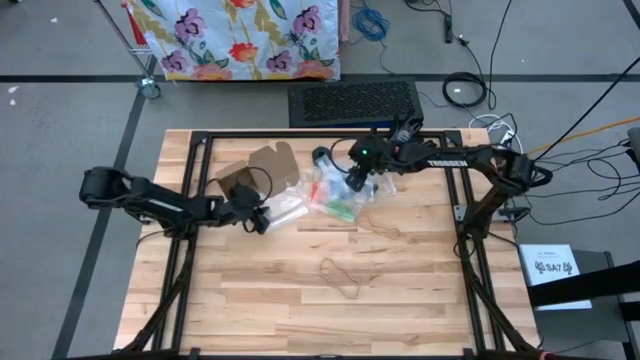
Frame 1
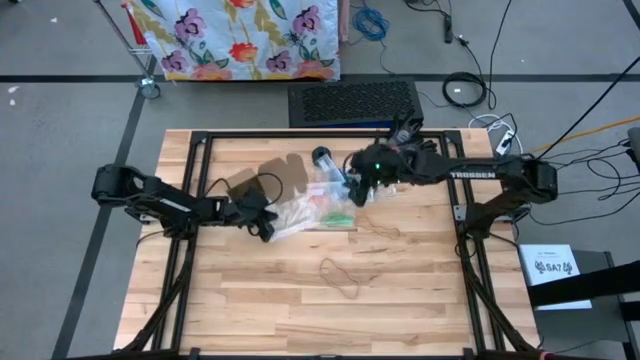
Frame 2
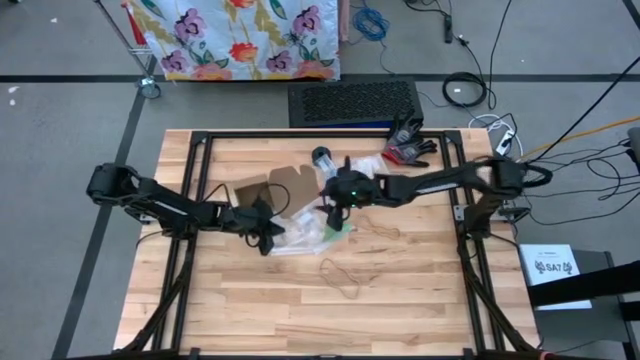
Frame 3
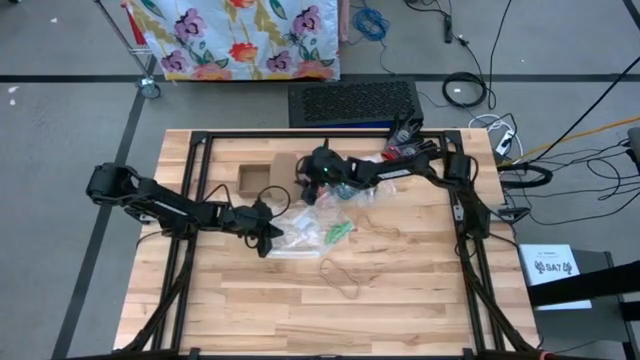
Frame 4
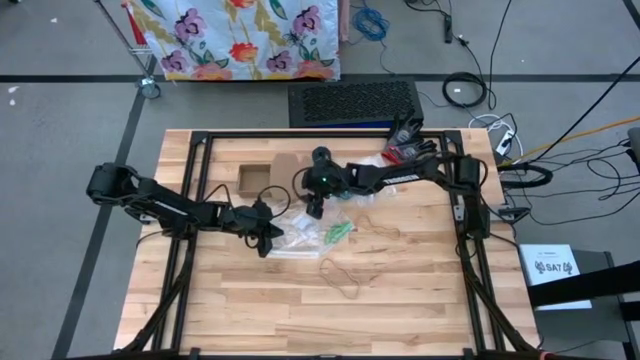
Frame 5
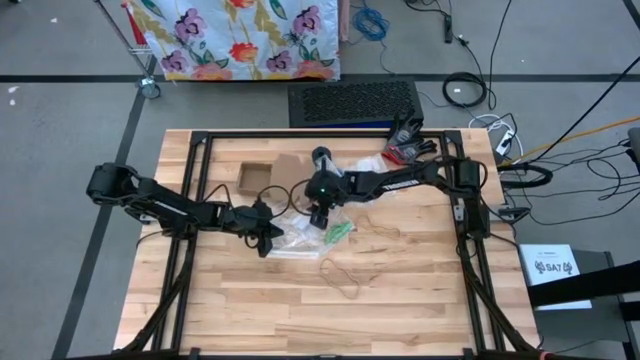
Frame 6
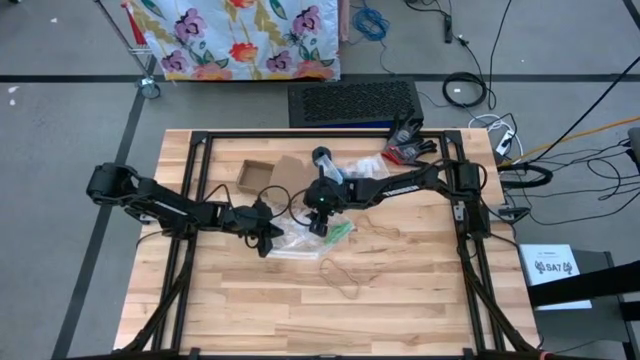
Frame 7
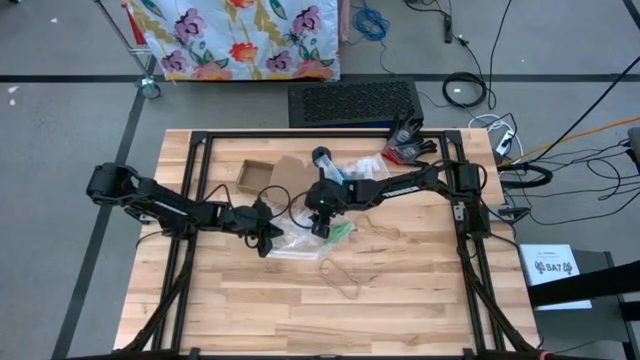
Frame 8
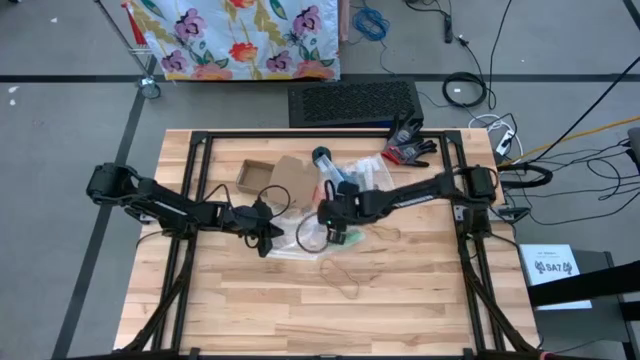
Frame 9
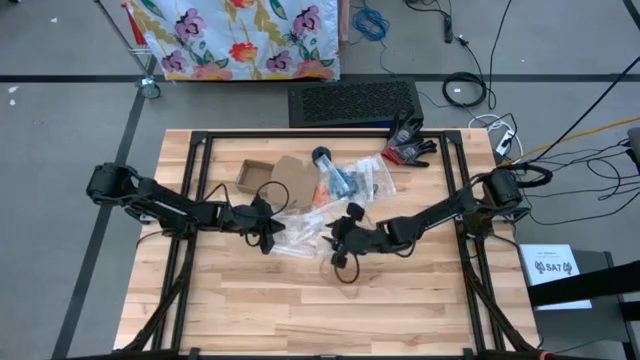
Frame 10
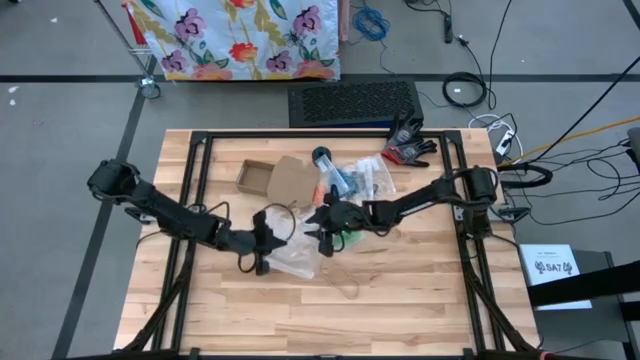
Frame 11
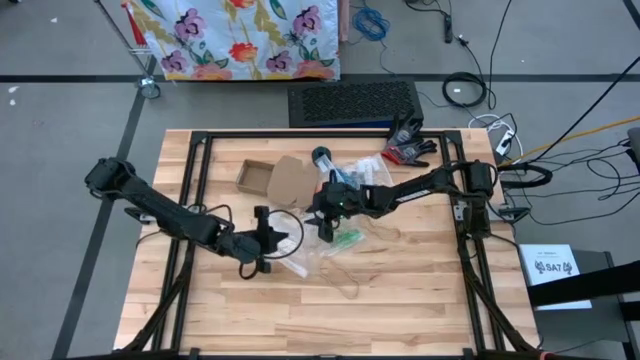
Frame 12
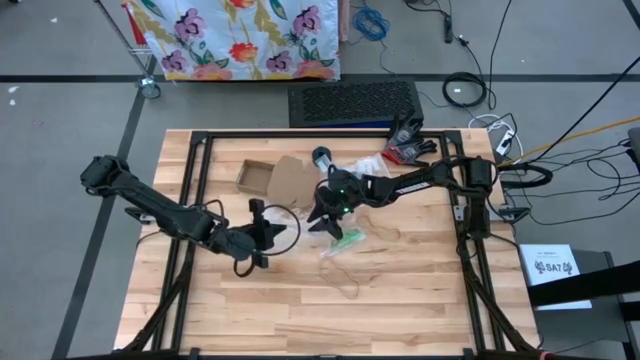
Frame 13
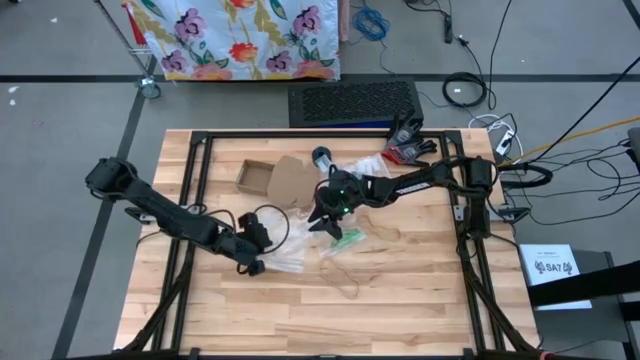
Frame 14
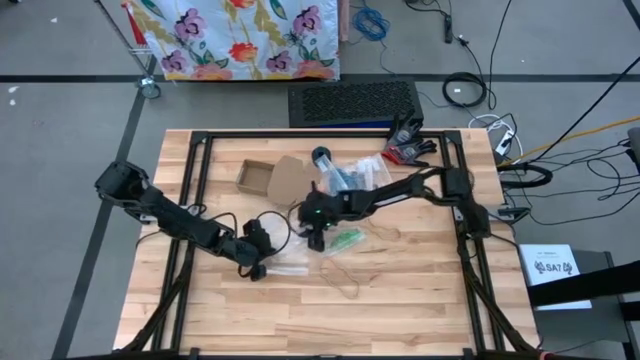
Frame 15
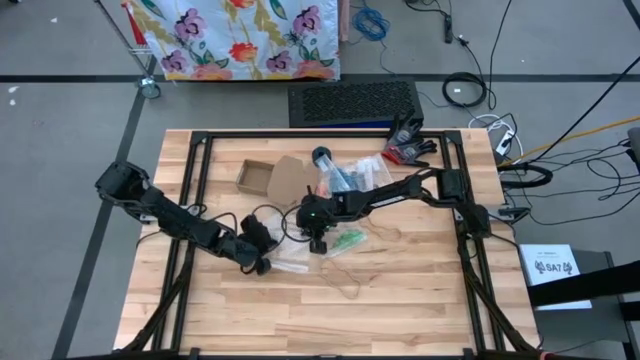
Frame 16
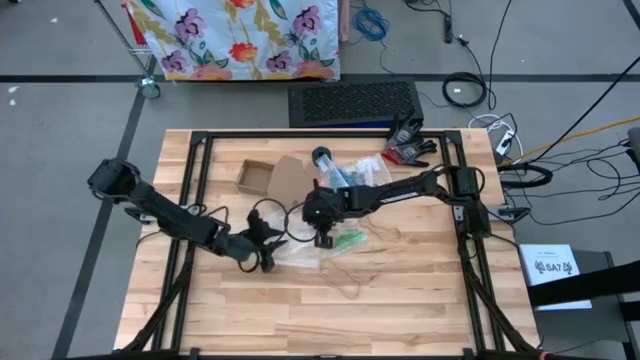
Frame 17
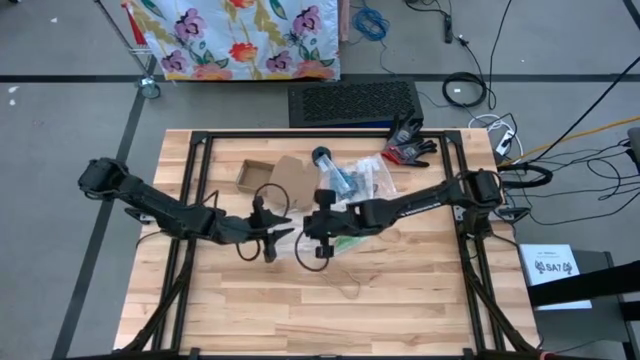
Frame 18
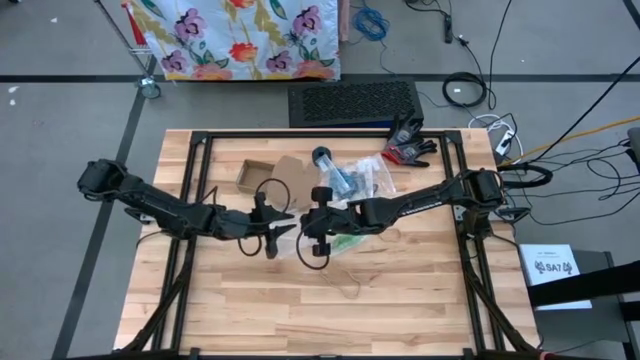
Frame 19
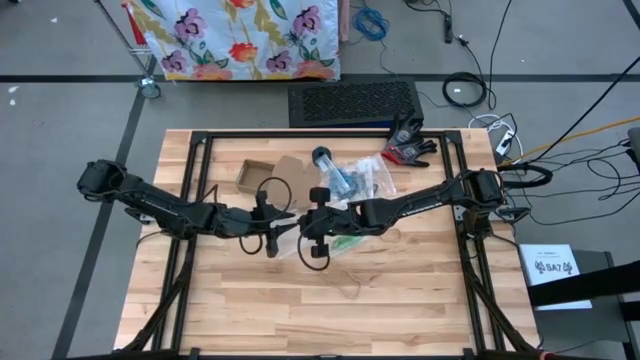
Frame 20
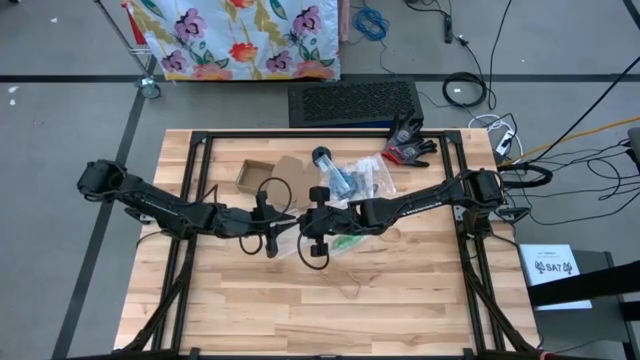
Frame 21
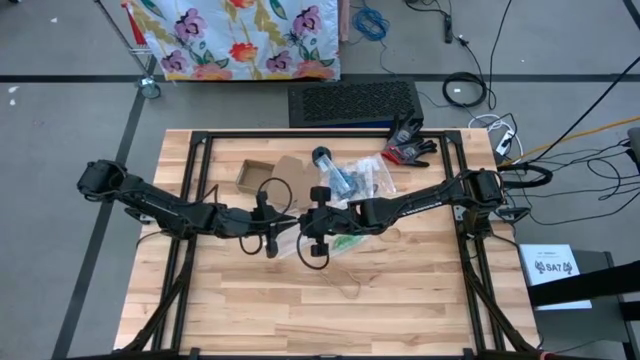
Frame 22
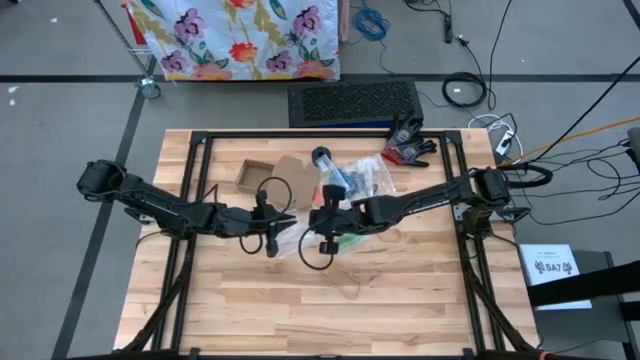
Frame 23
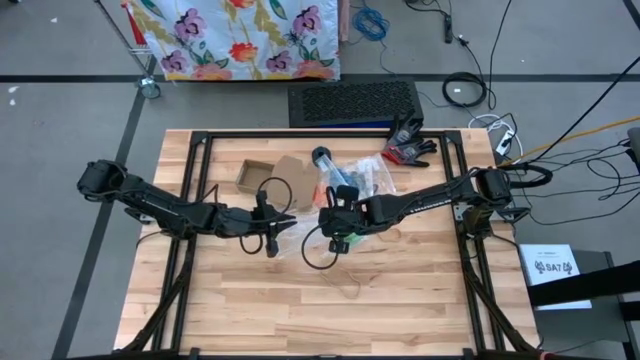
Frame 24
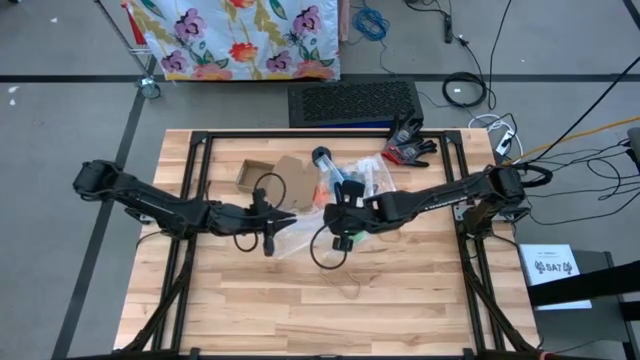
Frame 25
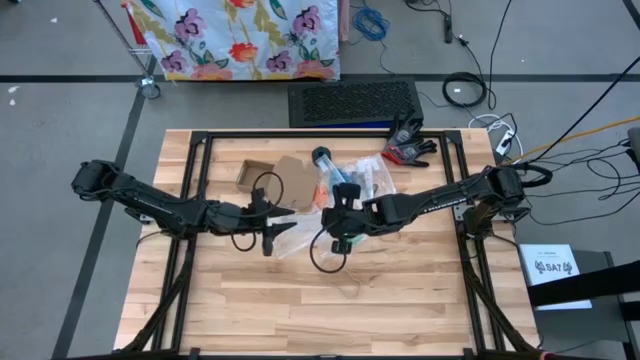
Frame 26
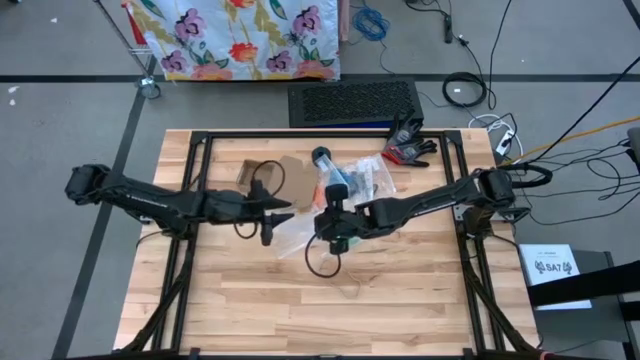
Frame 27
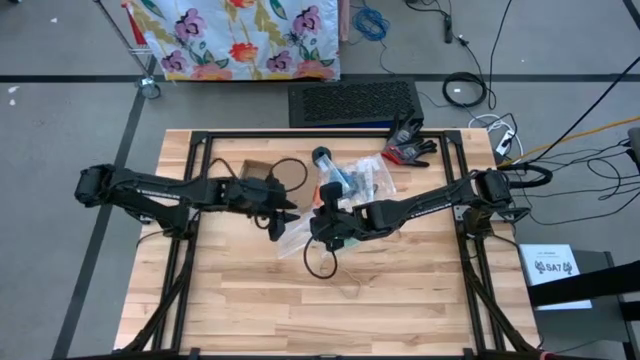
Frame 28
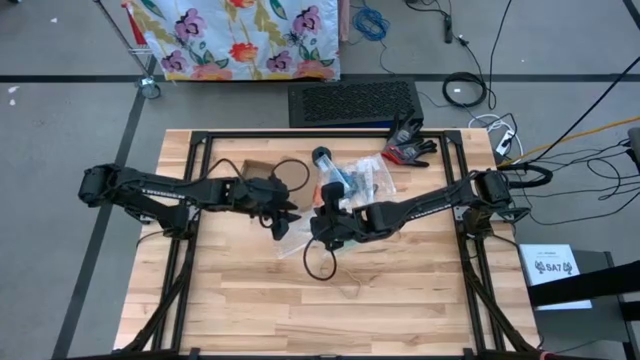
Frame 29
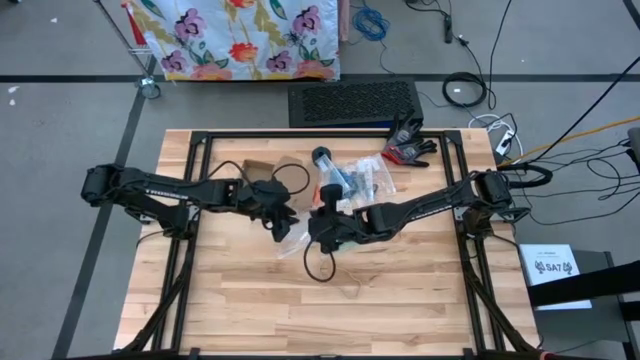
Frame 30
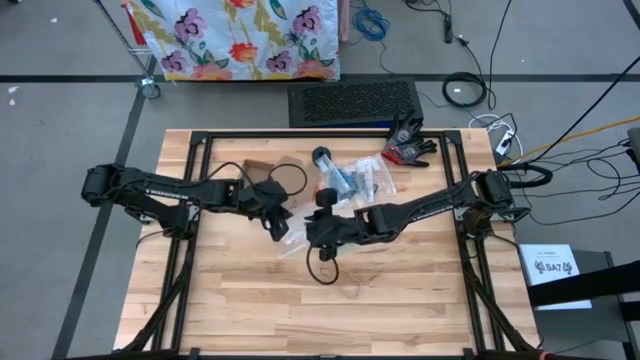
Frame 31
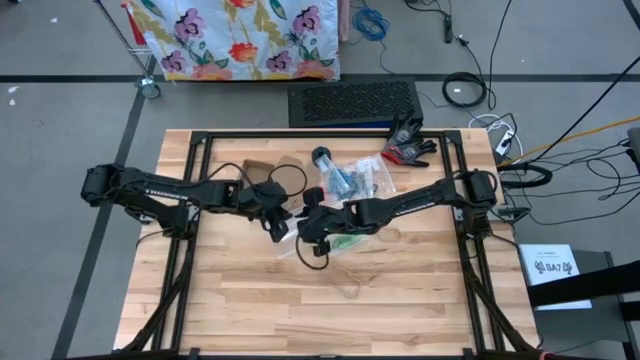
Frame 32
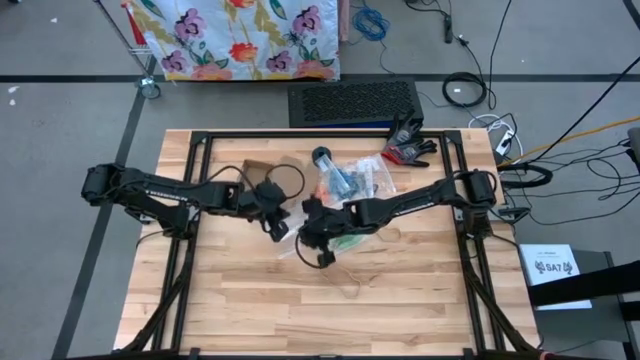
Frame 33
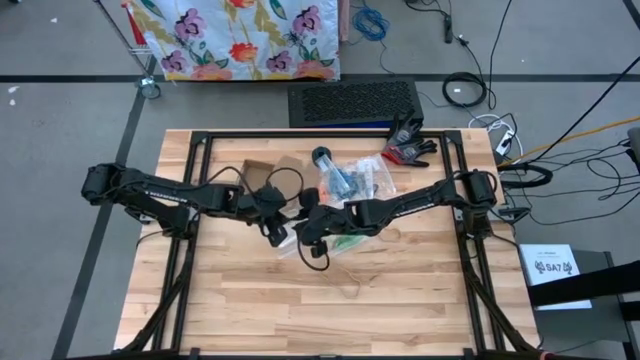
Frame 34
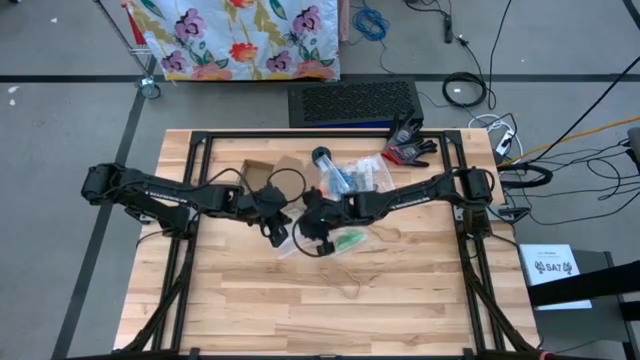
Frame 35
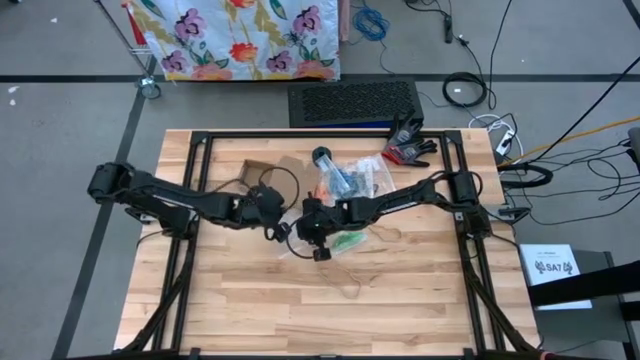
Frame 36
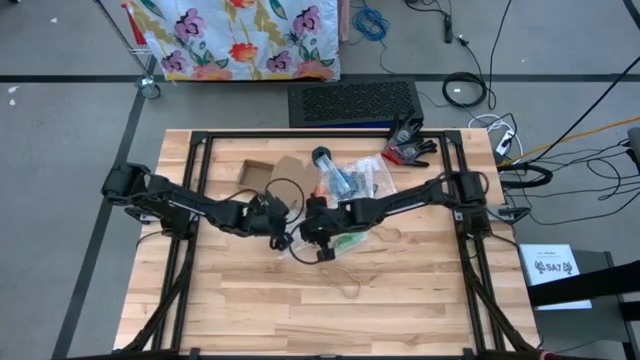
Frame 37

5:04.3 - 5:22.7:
Task: Sort rubber bands
Open the transparent zip bag

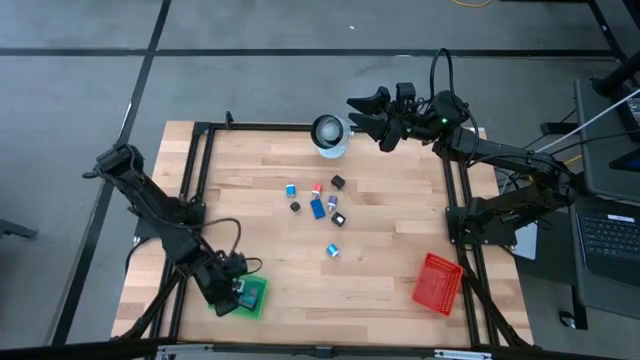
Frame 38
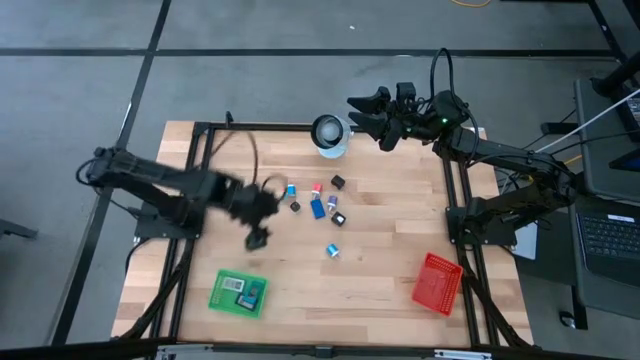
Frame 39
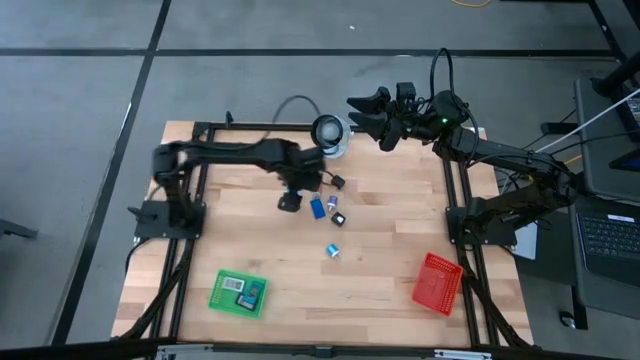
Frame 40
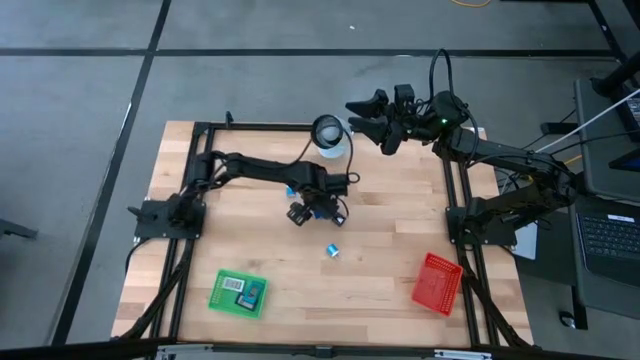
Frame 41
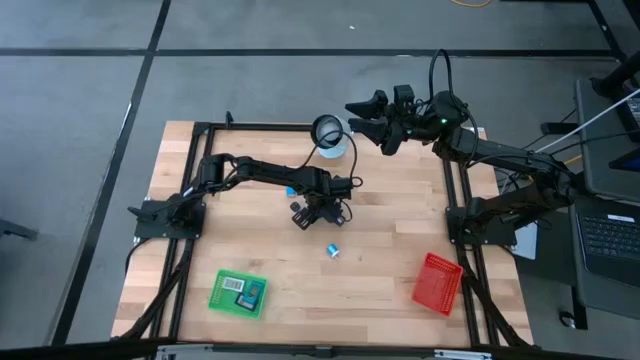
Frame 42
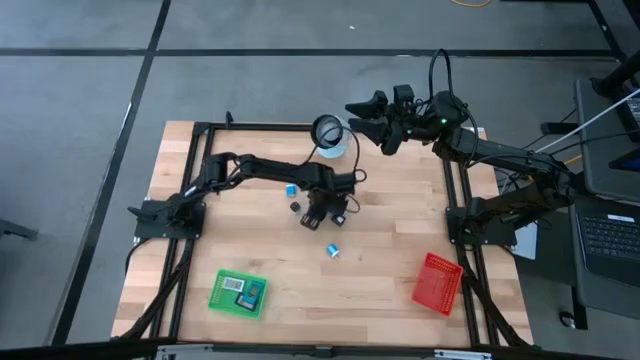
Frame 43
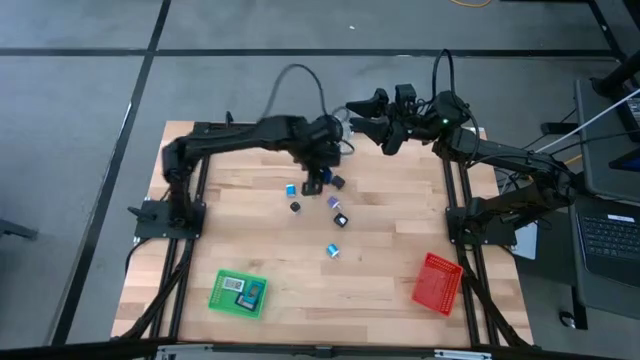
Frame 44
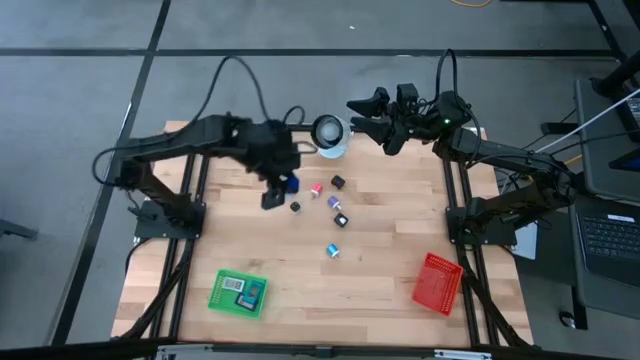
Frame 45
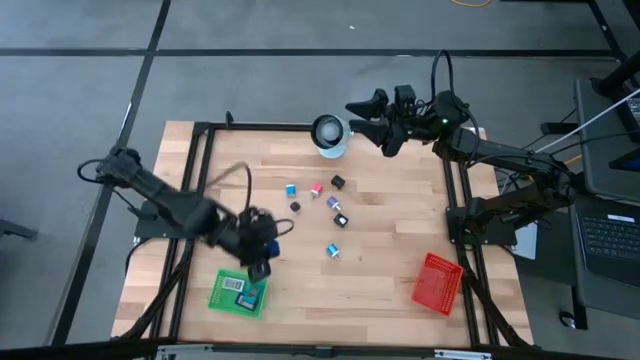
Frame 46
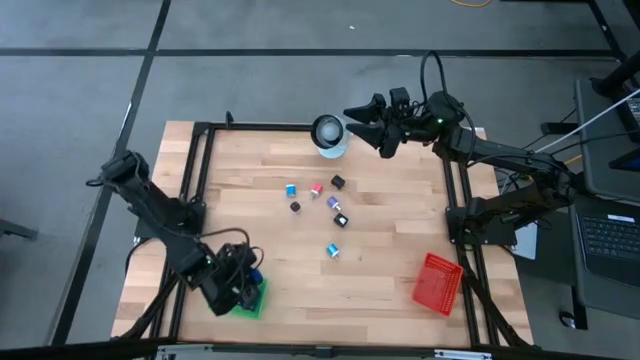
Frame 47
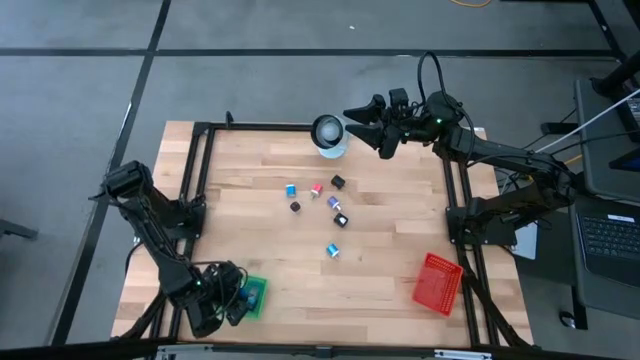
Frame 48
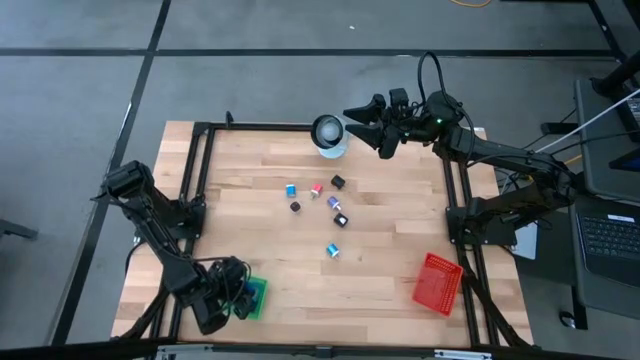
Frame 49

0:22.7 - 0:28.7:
Task: Pick & Place Office items
Put the blue digital clock into the green bin
